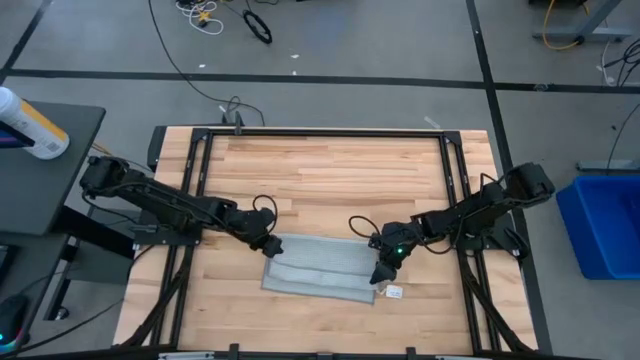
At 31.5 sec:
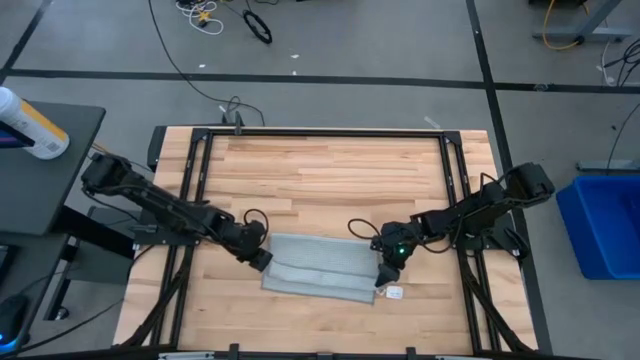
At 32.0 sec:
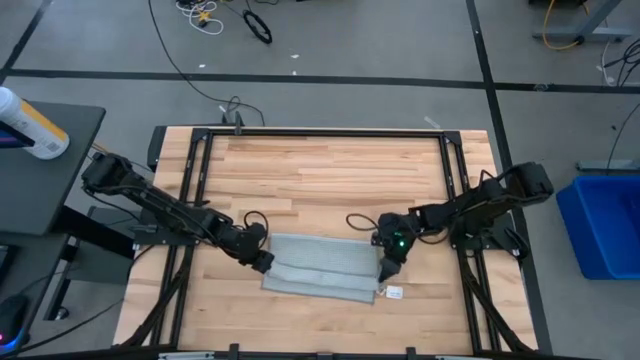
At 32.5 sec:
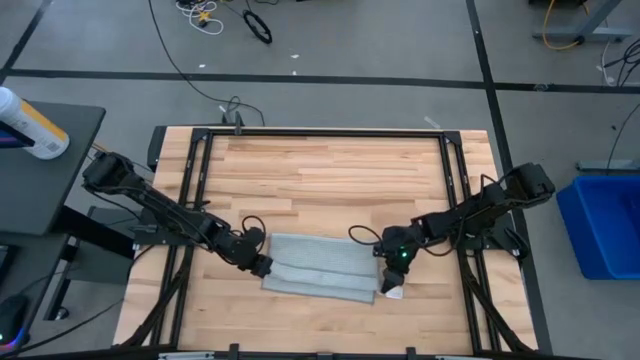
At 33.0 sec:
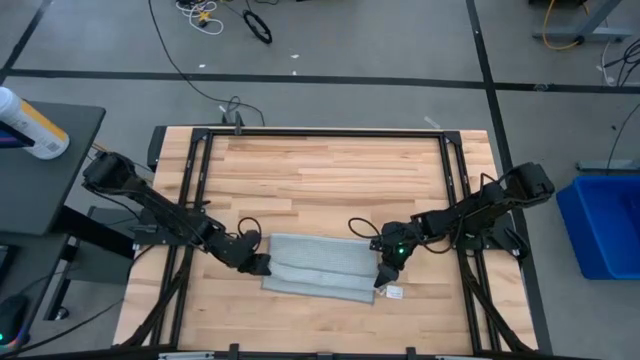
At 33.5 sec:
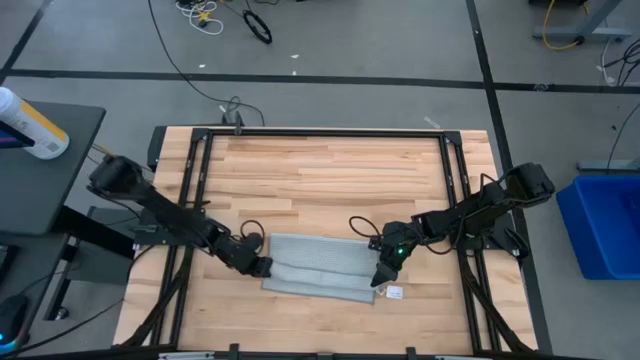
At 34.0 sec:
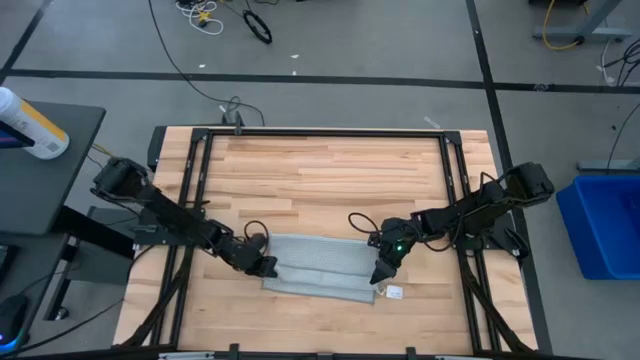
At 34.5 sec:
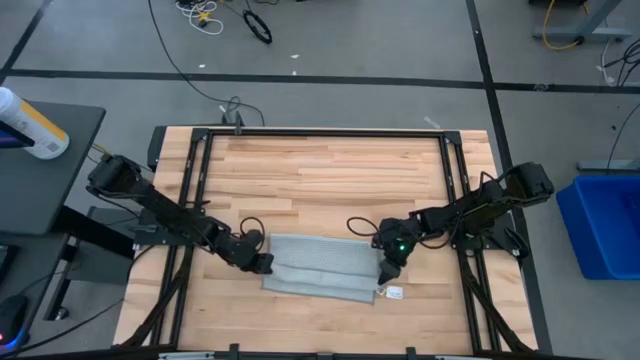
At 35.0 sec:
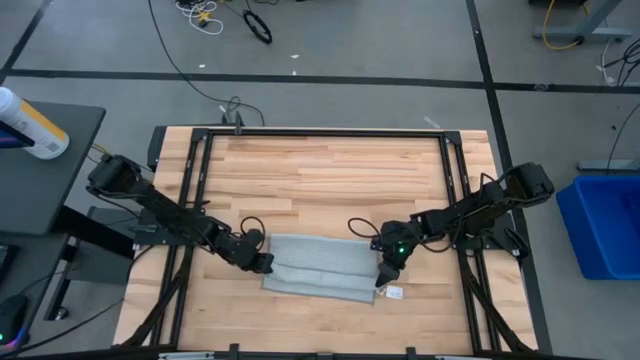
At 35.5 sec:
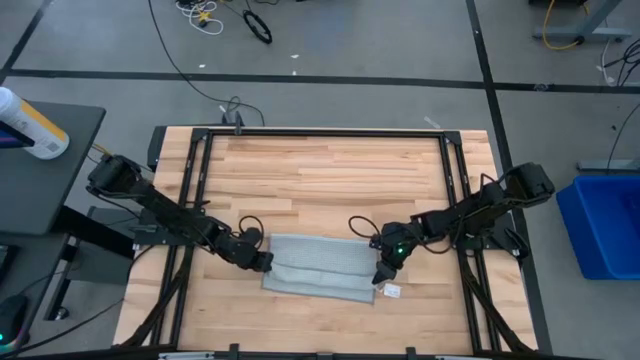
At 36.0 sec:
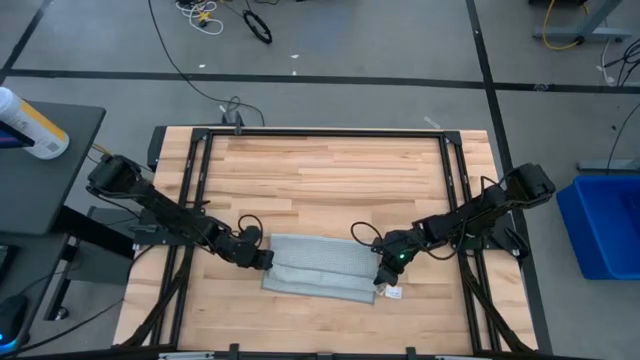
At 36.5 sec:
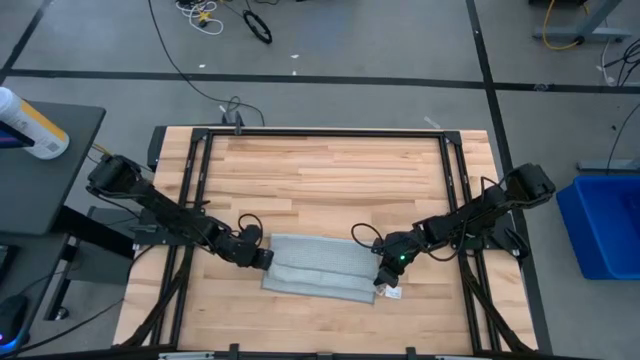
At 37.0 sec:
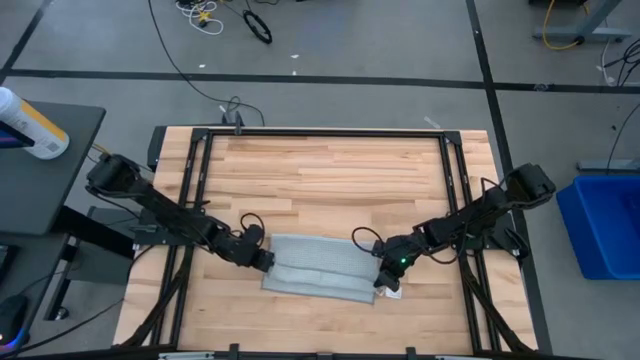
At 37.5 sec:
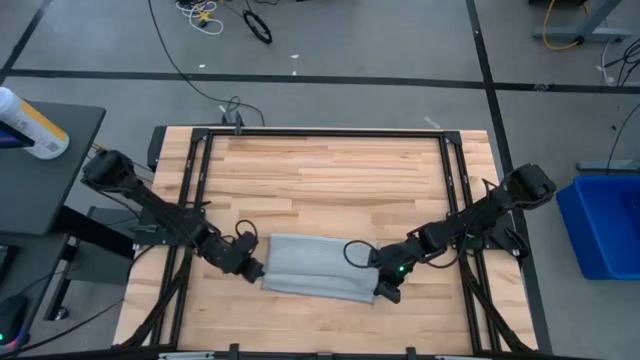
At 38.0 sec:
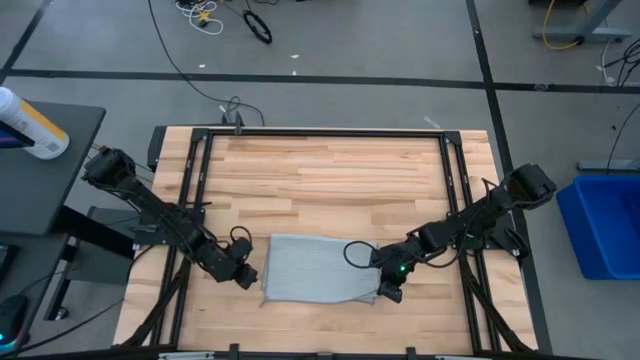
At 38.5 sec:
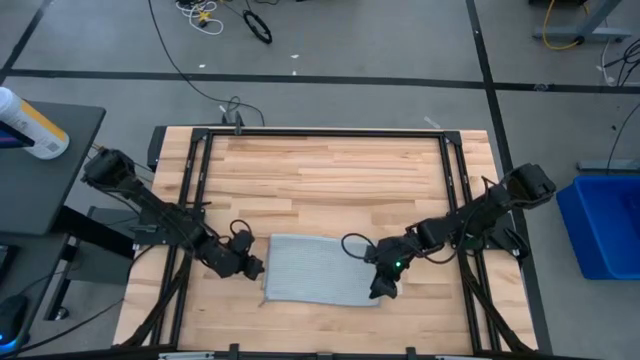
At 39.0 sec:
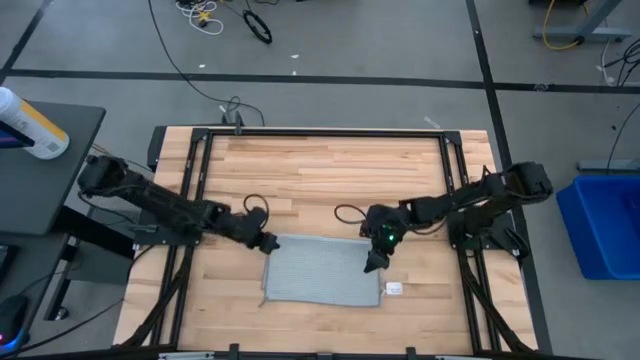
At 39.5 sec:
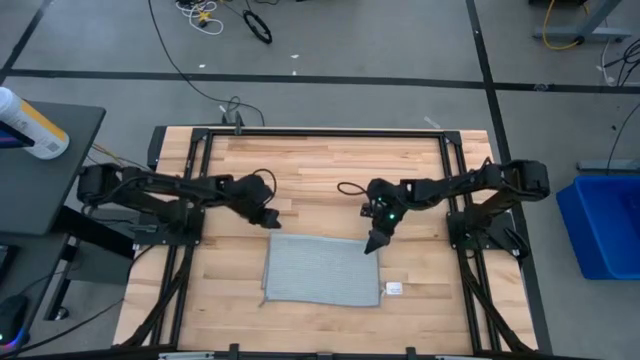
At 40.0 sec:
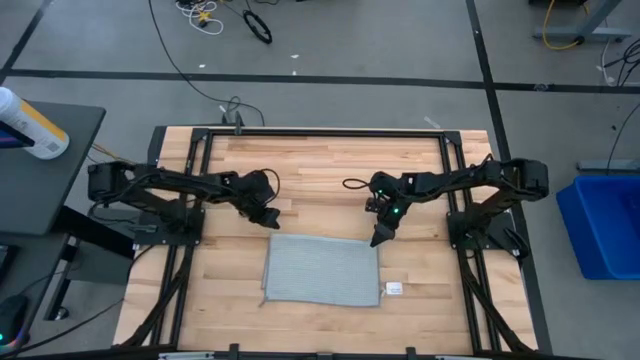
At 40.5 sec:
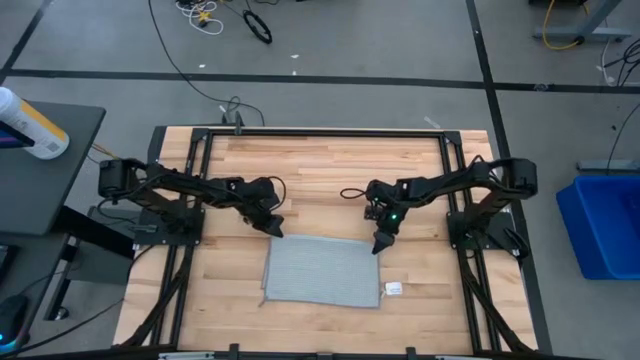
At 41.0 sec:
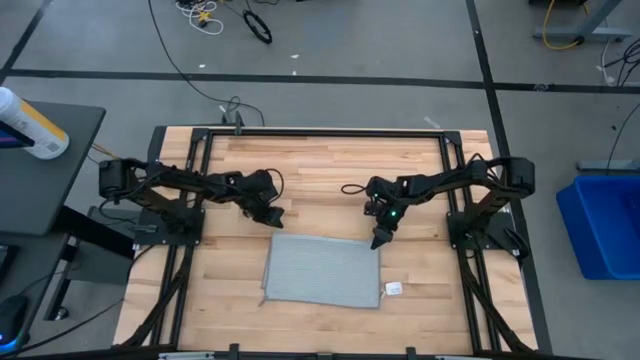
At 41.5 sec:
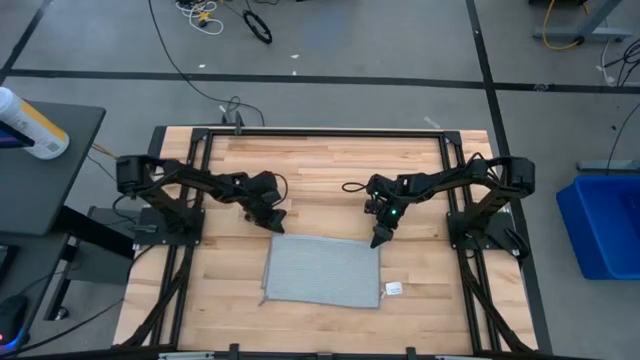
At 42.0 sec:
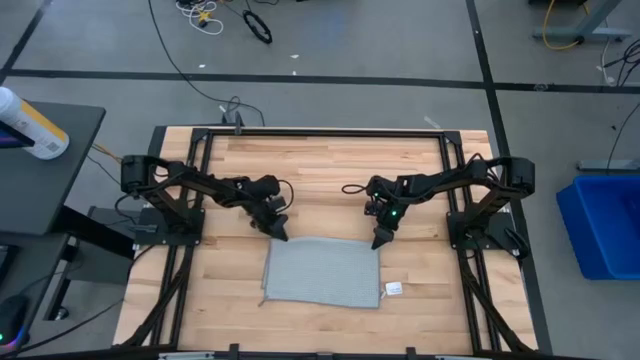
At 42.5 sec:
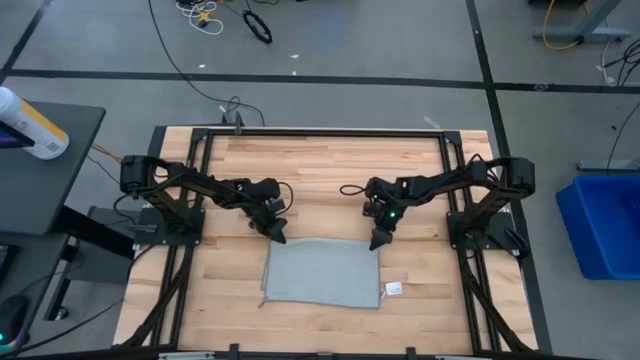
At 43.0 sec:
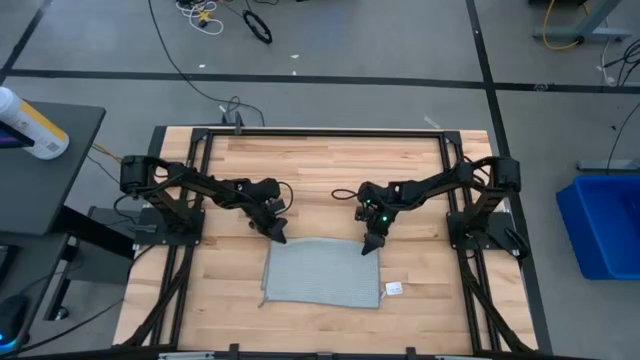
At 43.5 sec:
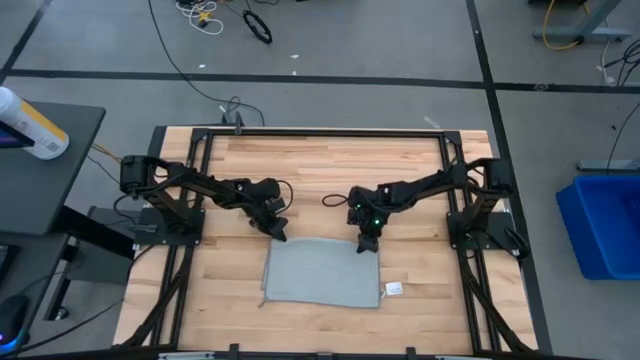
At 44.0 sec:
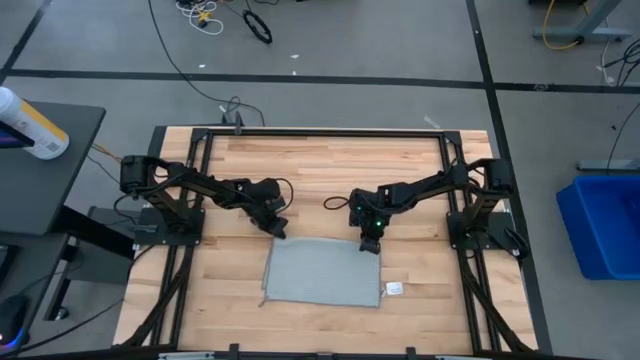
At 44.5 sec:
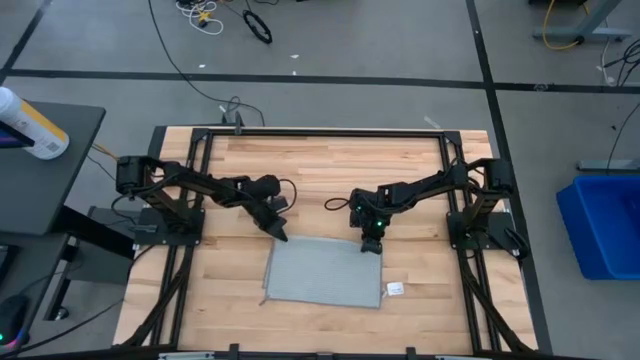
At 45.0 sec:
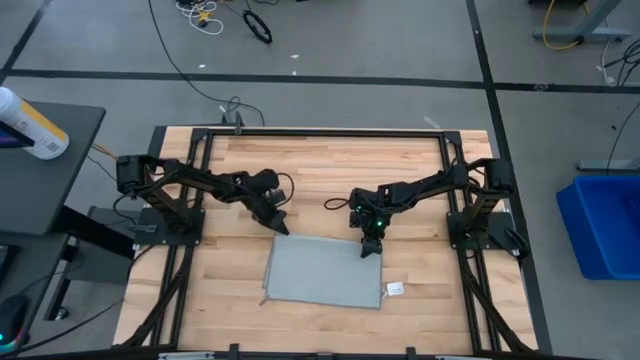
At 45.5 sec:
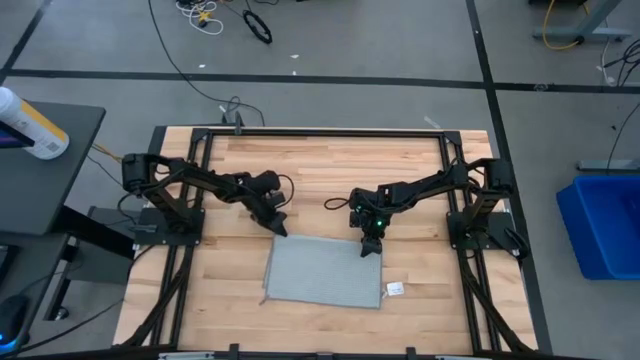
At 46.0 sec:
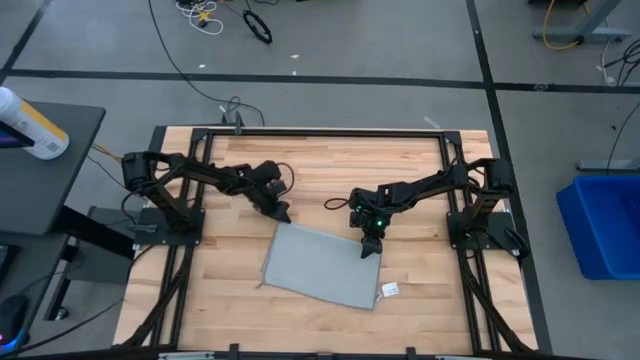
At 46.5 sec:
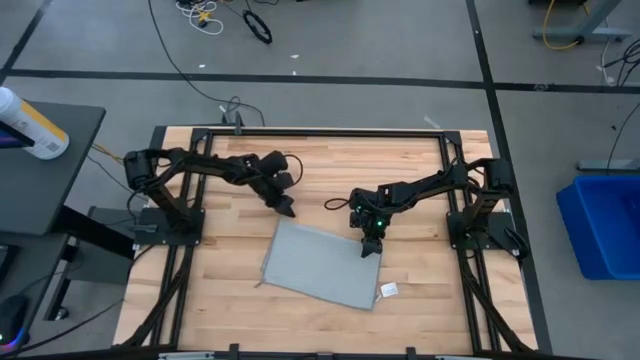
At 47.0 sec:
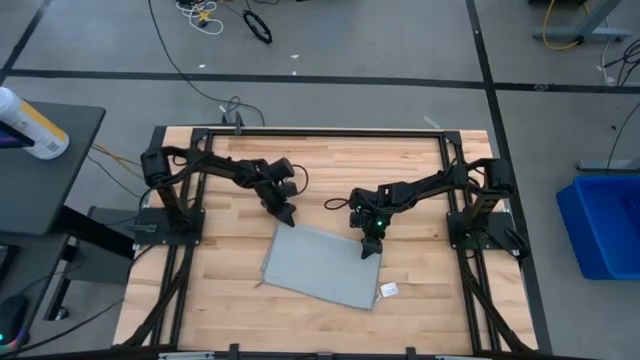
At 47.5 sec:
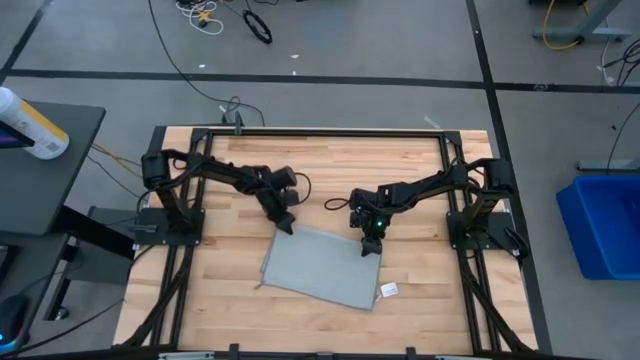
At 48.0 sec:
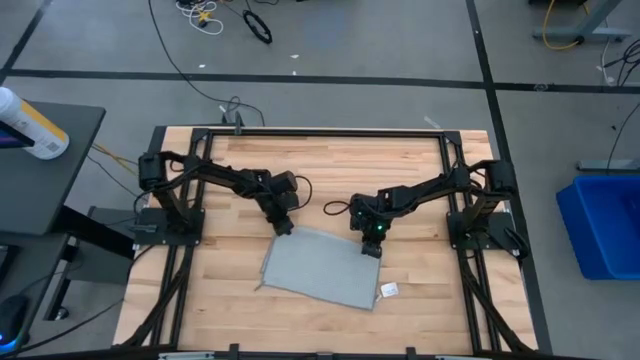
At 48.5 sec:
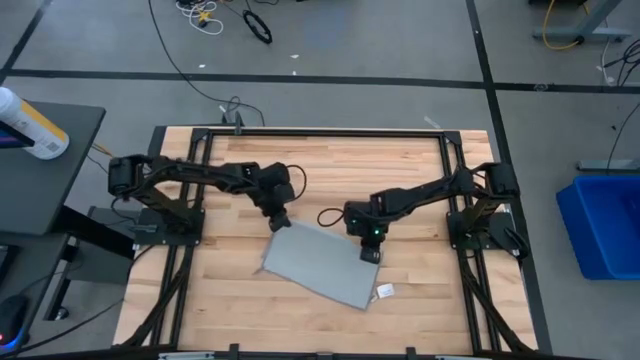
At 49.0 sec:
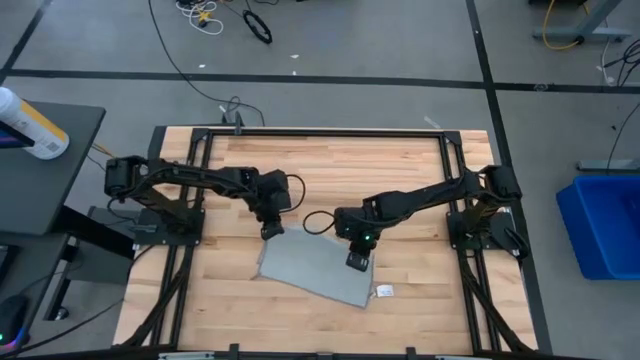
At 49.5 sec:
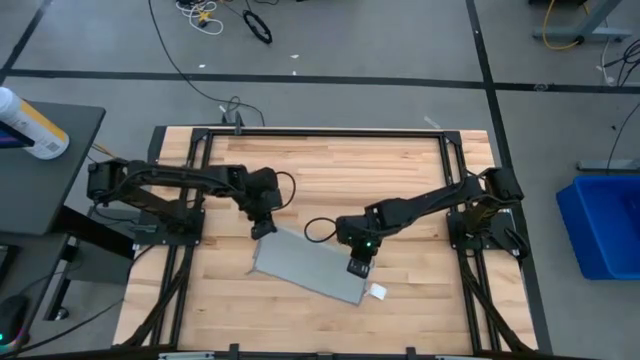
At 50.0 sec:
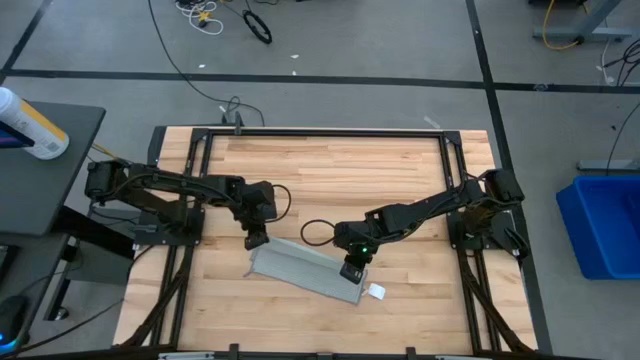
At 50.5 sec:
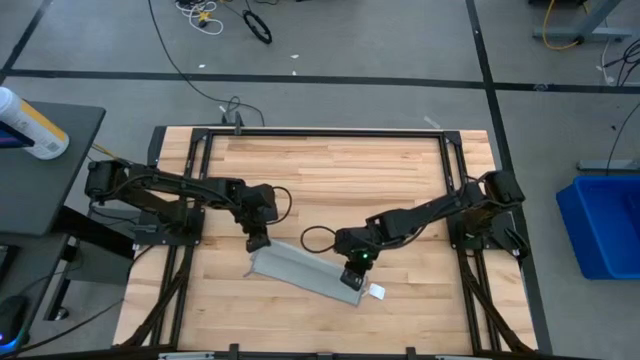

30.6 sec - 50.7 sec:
Task: Fold microfiber towels
Fold the grey towel
